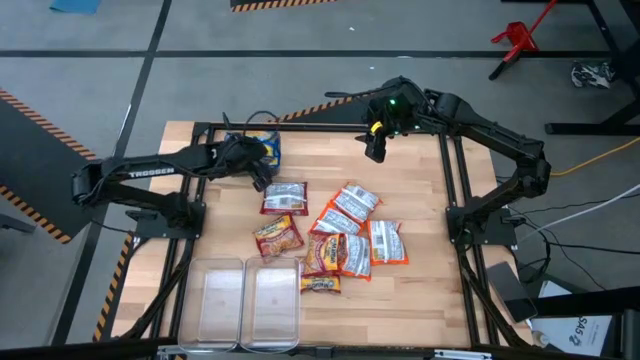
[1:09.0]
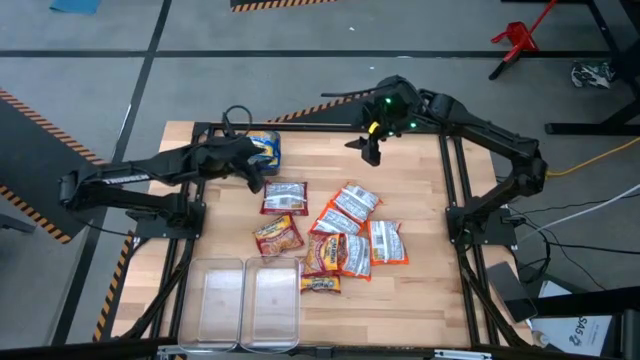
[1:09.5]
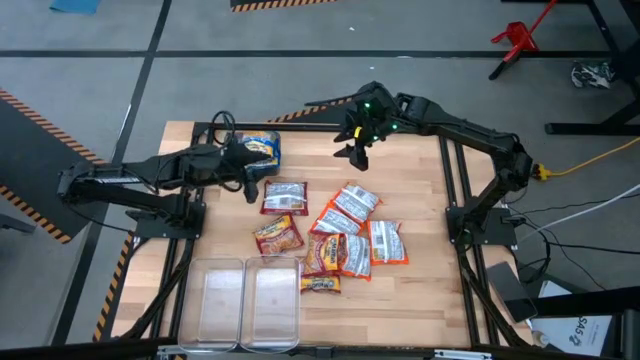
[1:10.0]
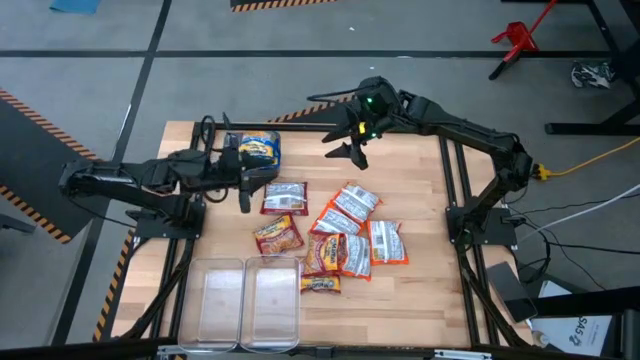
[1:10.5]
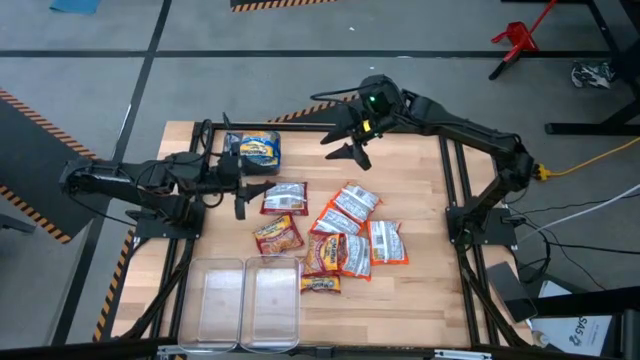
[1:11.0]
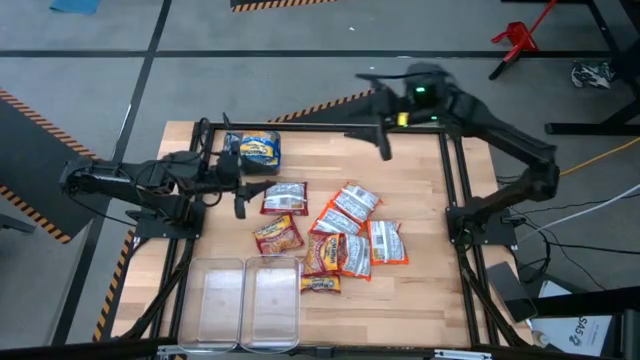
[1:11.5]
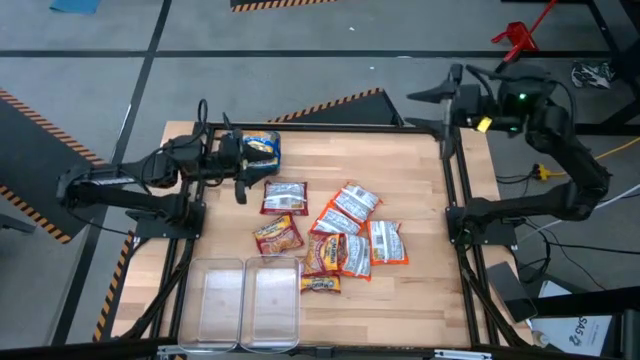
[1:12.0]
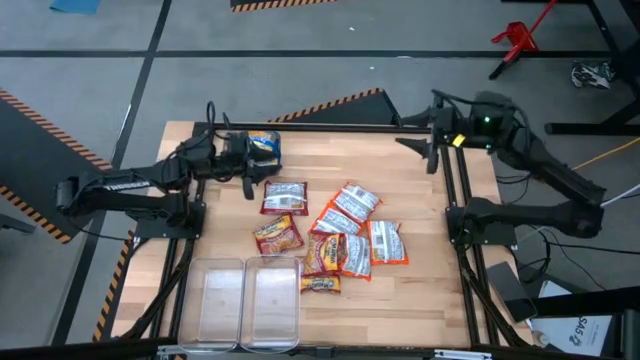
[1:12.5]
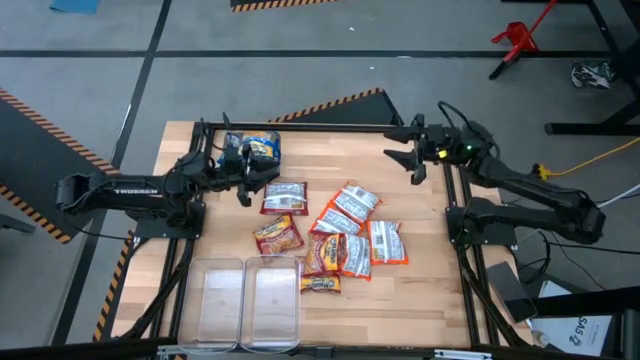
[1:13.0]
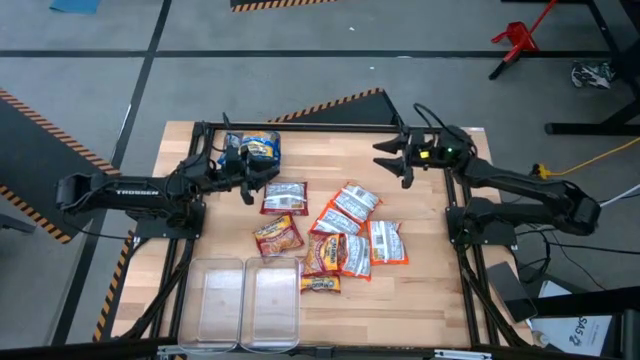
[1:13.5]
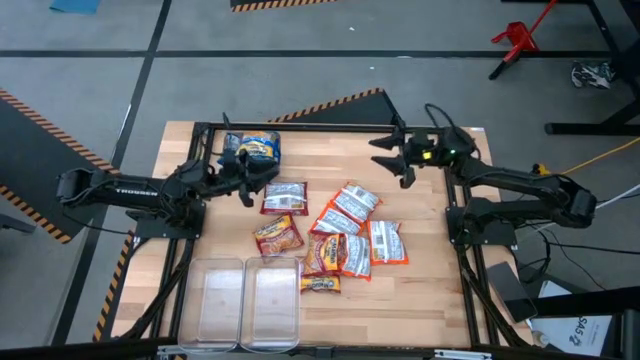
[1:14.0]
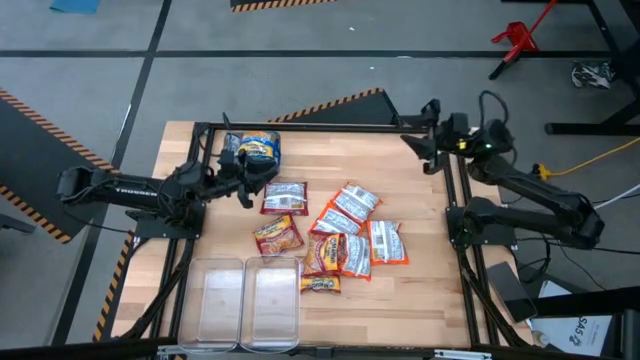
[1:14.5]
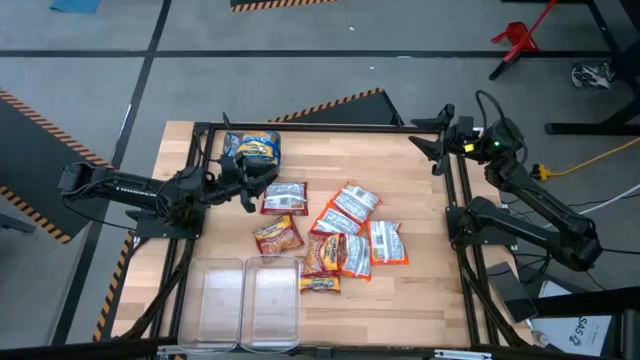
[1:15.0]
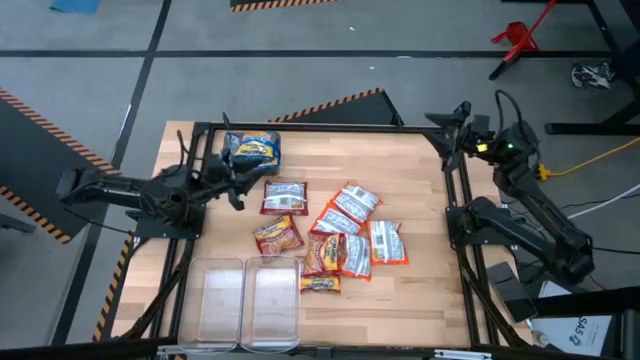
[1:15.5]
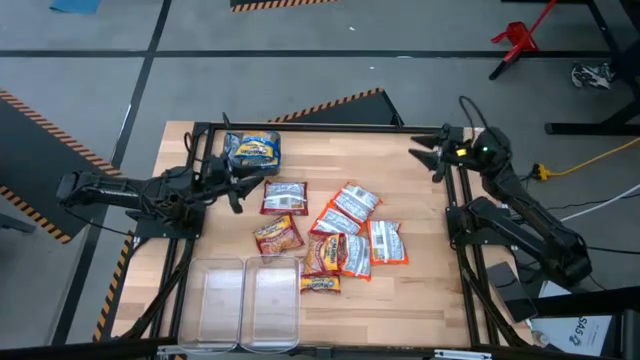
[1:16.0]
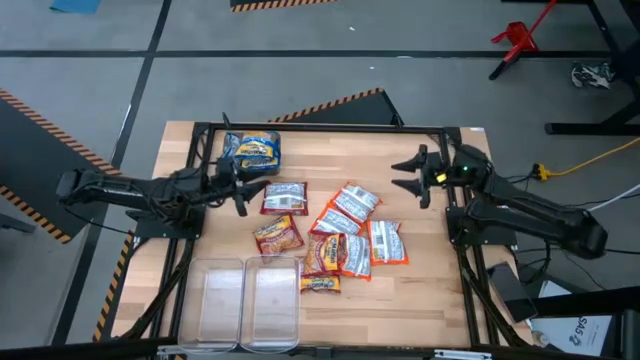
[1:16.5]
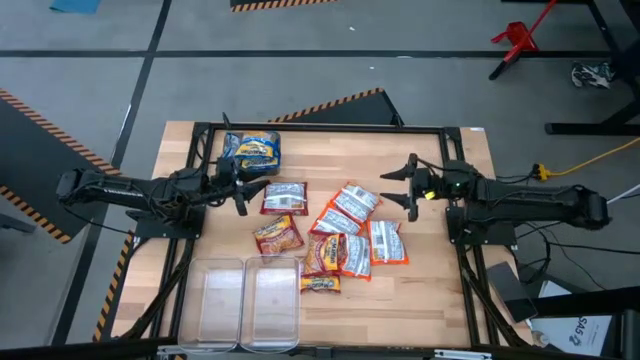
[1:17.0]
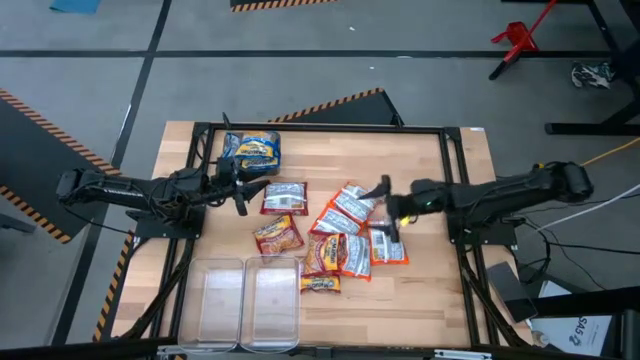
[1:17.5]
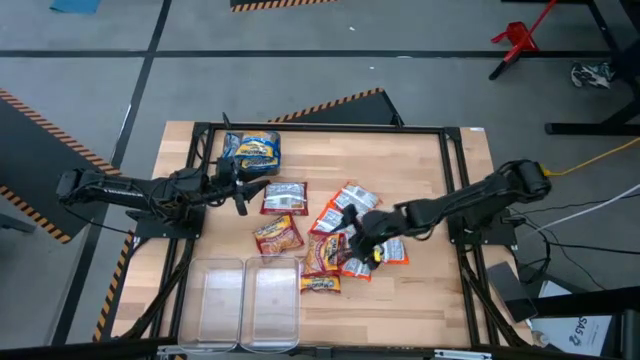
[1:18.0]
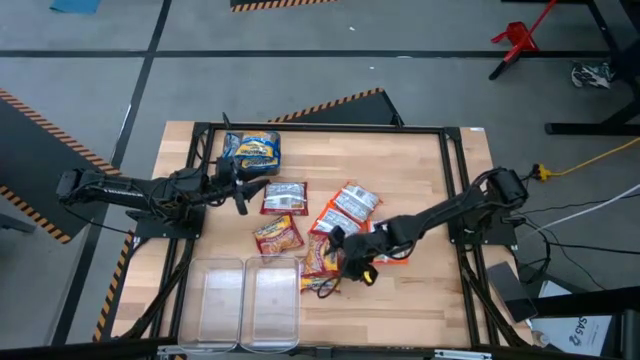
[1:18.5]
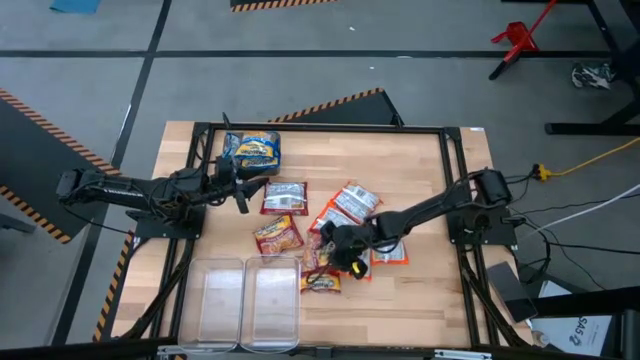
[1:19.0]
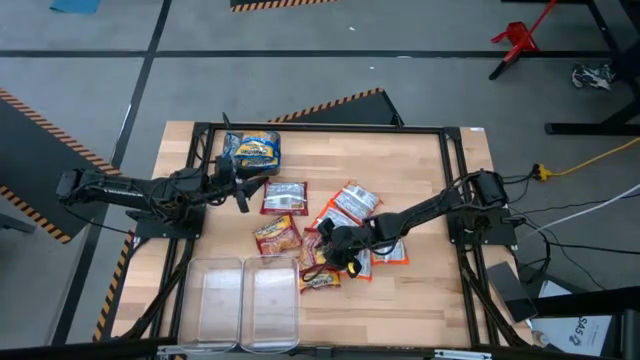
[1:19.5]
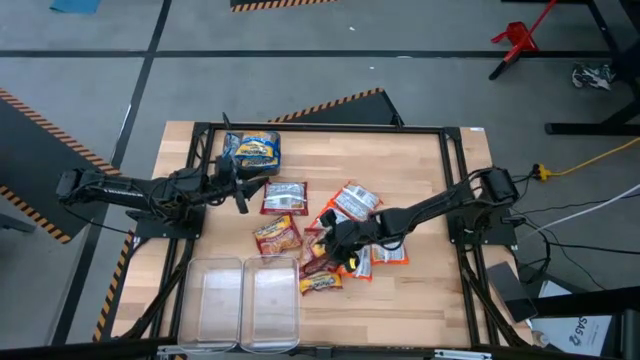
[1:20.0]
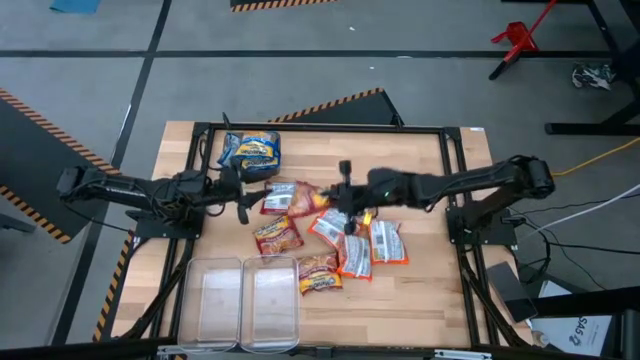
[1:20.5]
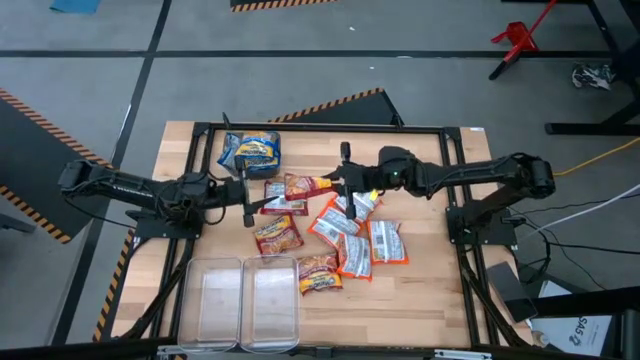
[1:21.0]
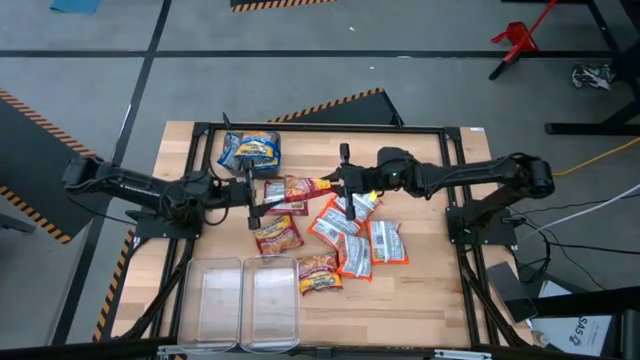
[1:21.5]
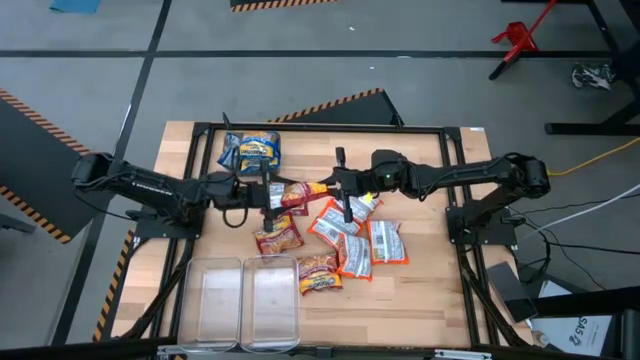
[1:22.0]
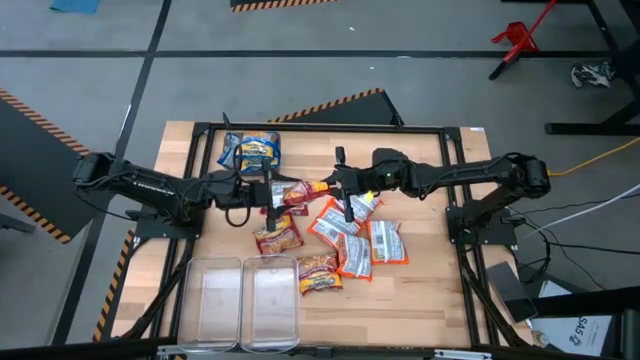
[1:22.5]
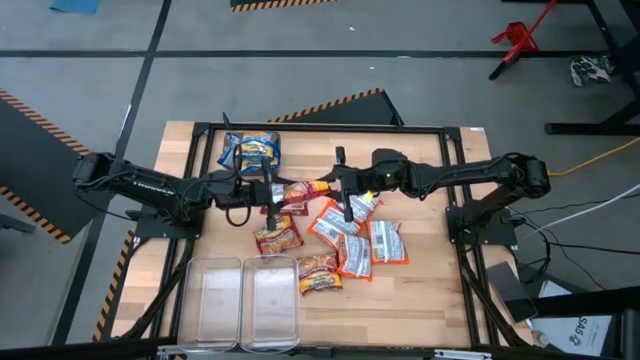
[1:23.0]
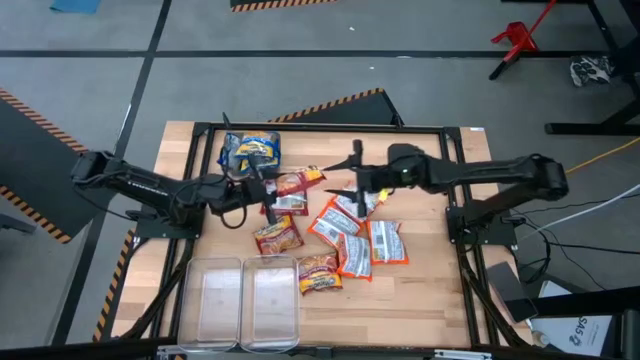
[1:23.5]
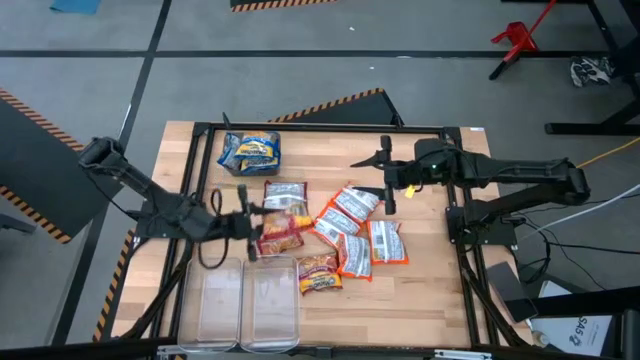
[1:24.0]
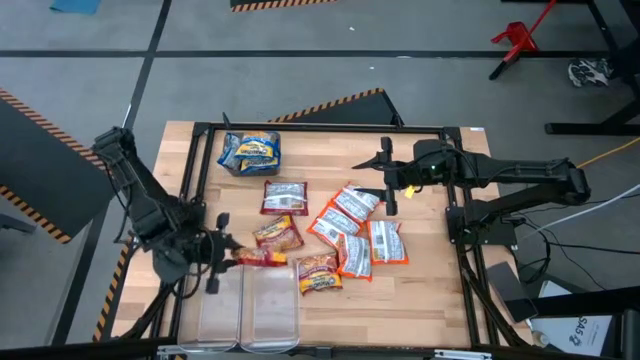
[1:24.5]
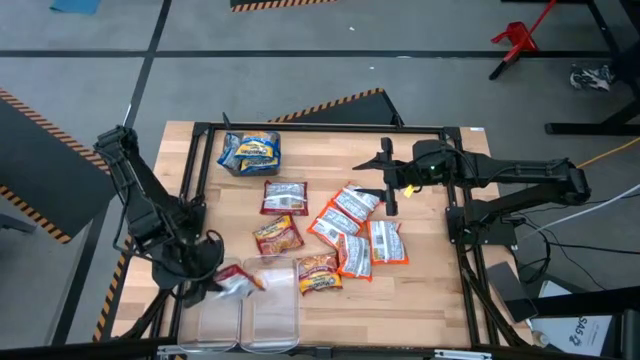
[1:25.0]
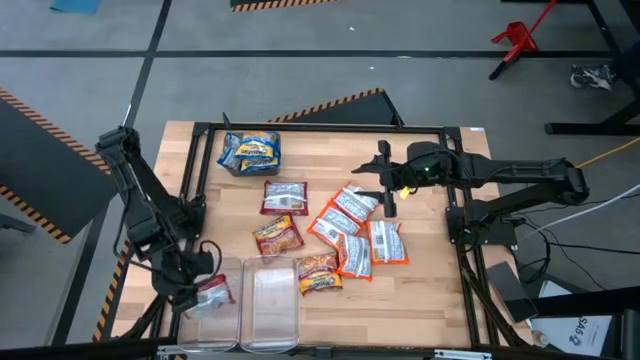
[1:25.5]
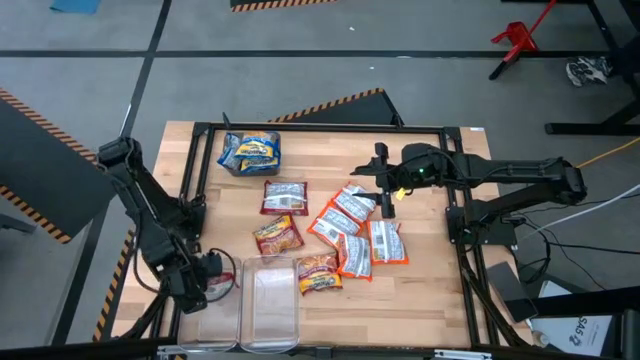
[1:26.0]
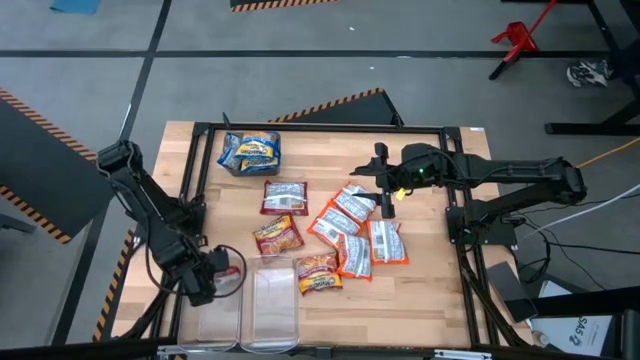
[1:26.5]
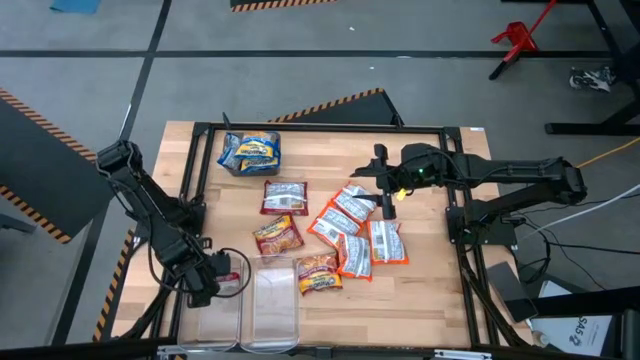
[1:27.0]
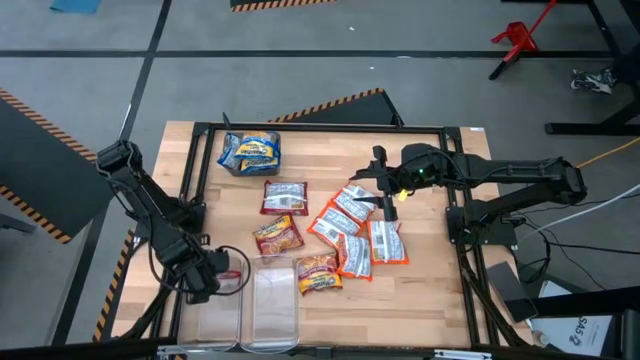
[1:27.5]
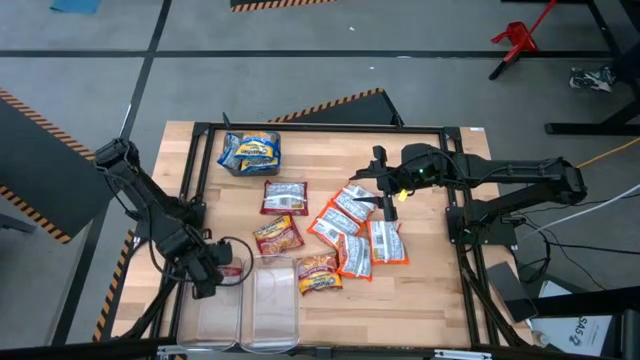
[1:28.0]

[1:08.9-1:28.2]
Task: Sort Maruchan noodles
Put the red noodle pack into the left transparent bin

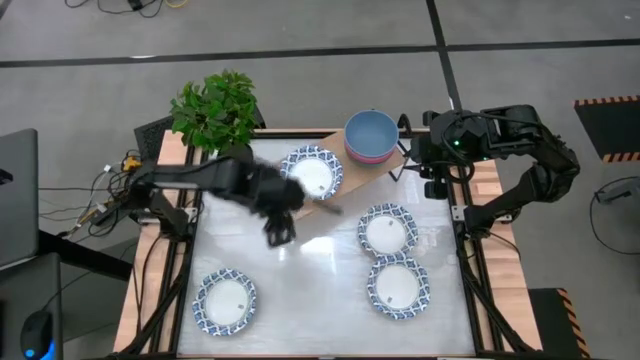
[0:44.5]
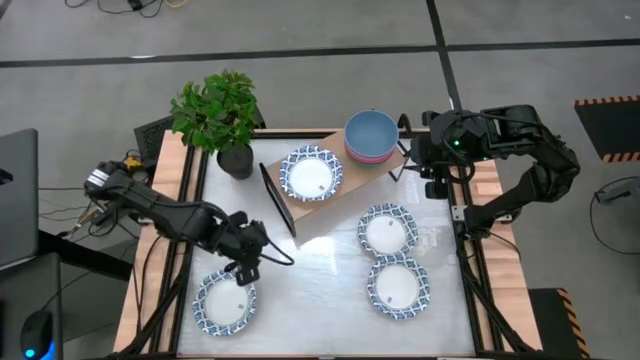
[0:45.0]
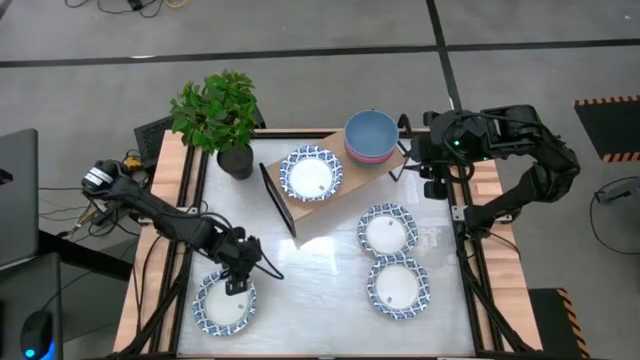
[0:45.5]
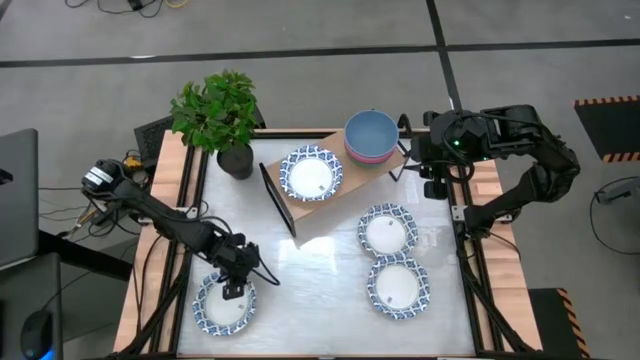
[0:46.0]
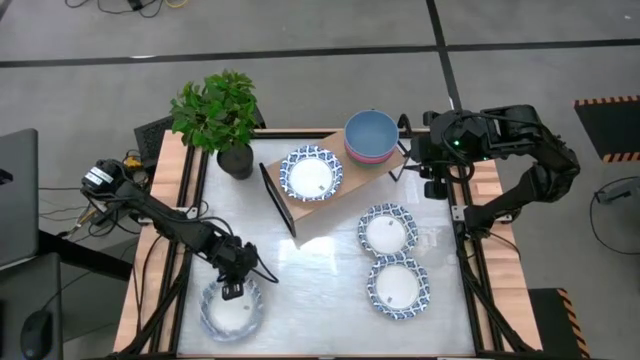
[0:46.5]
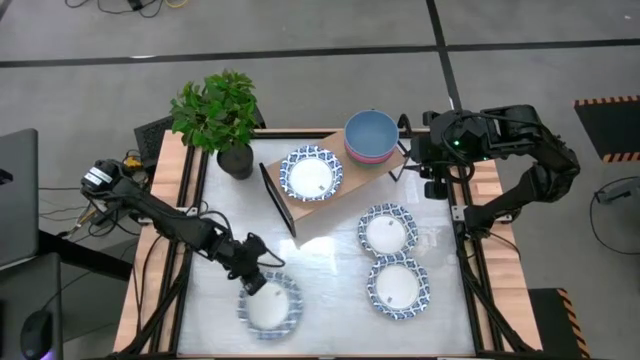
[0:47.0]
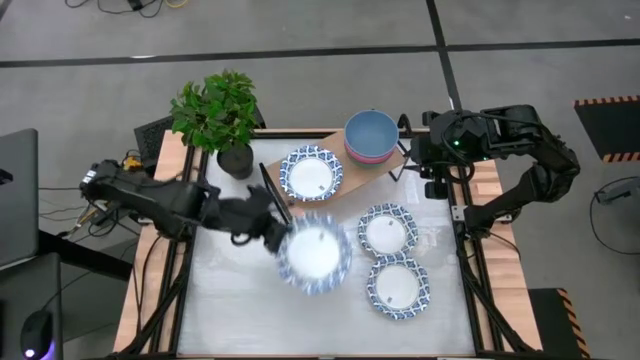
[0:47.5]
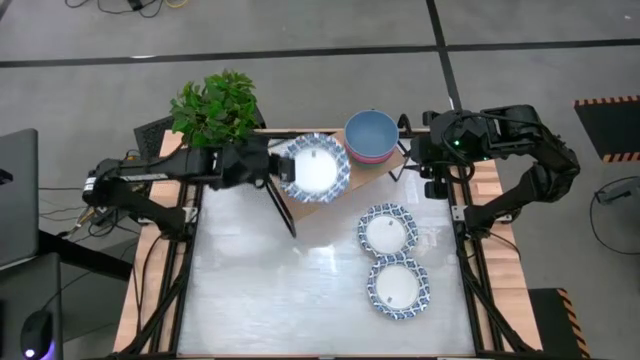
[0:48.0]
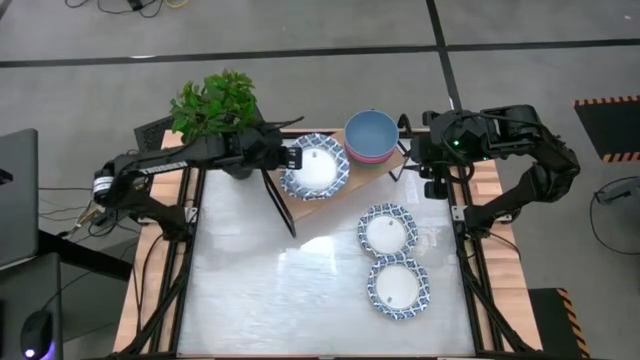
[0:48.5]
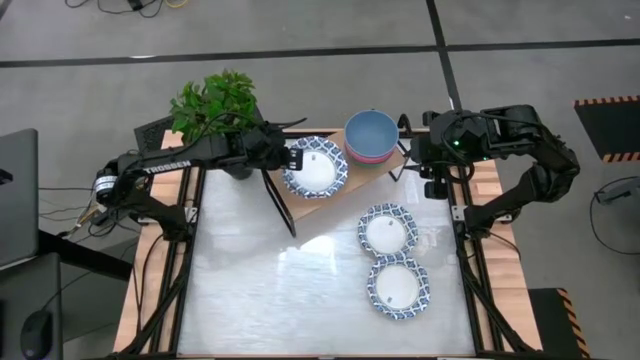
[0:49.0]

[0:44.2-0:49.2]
Task: Place and stack bowls onto a shelf
Stack the white and blue patterned bowl on the white and blue patterned bowl on the shelf
